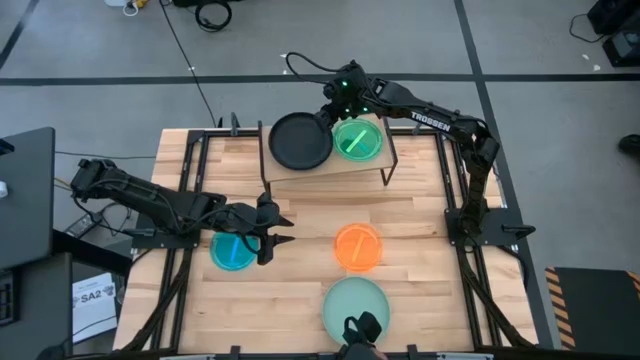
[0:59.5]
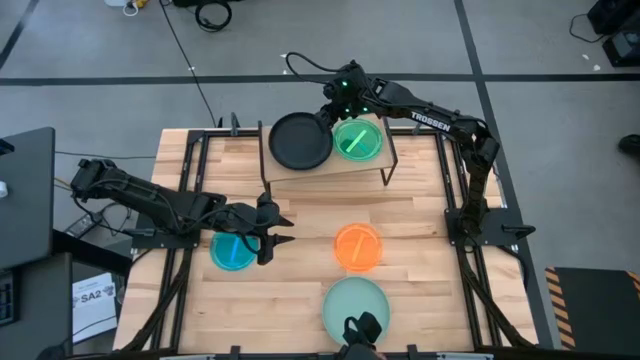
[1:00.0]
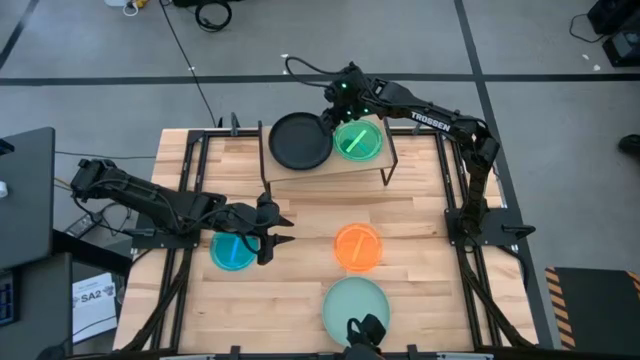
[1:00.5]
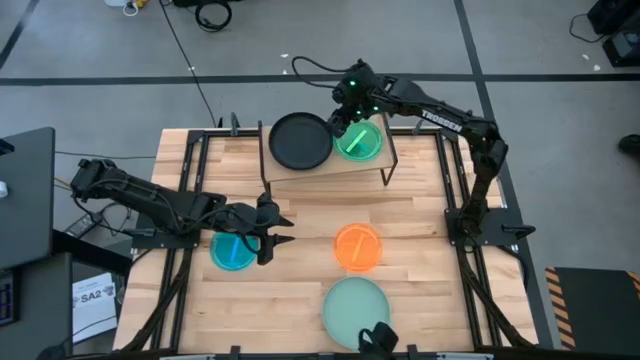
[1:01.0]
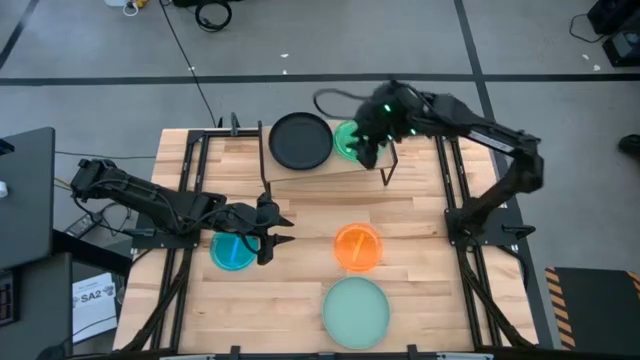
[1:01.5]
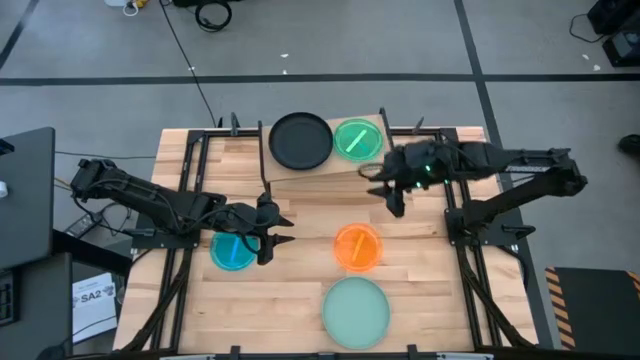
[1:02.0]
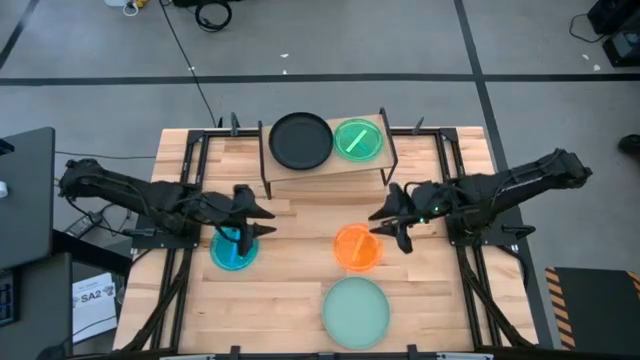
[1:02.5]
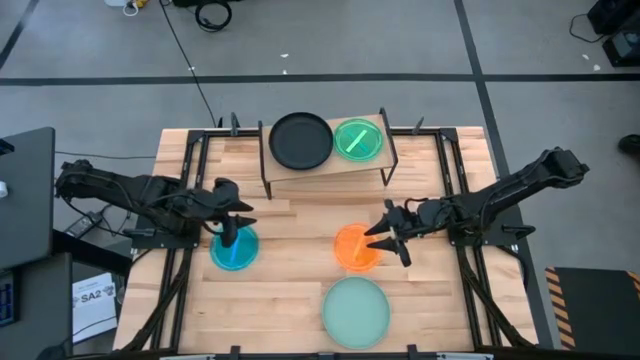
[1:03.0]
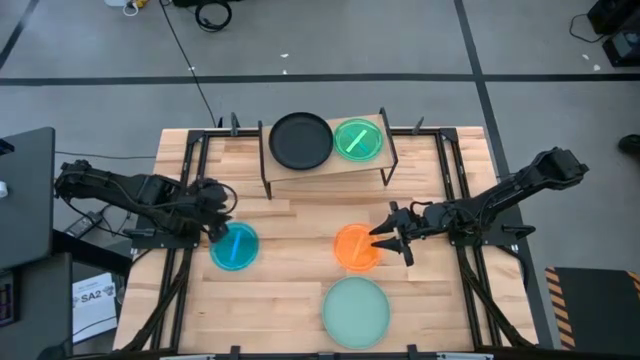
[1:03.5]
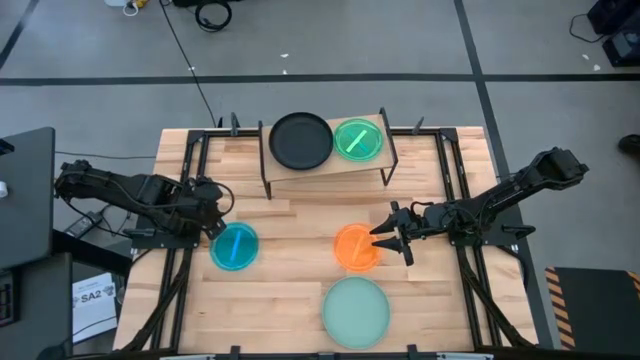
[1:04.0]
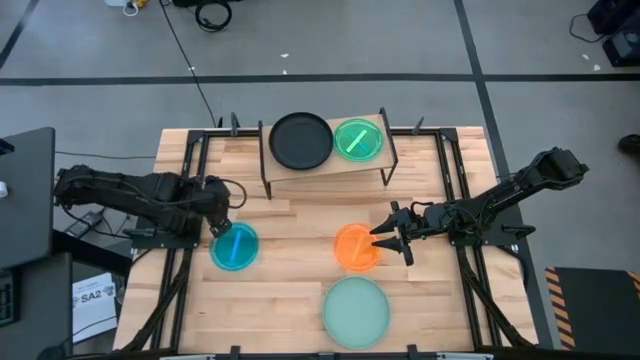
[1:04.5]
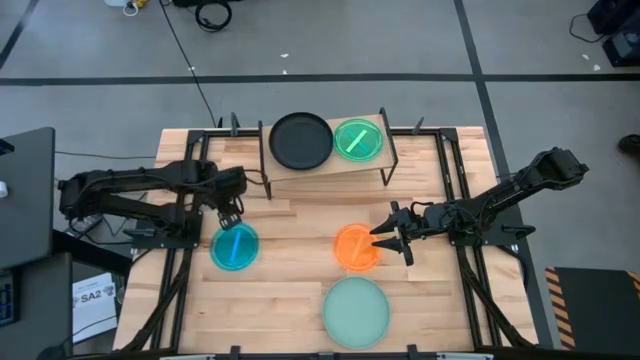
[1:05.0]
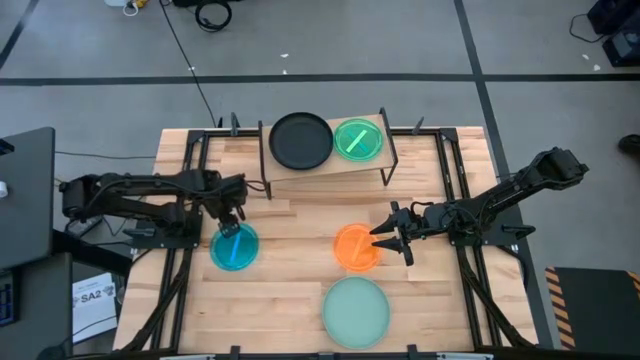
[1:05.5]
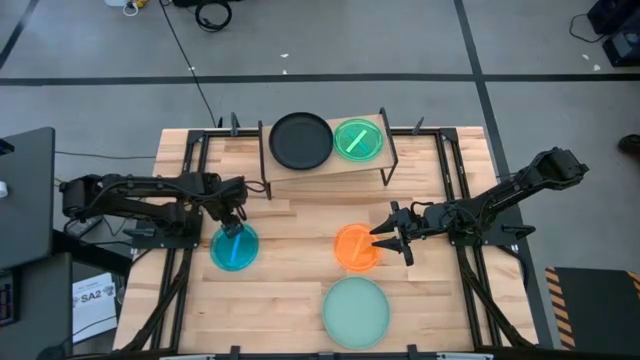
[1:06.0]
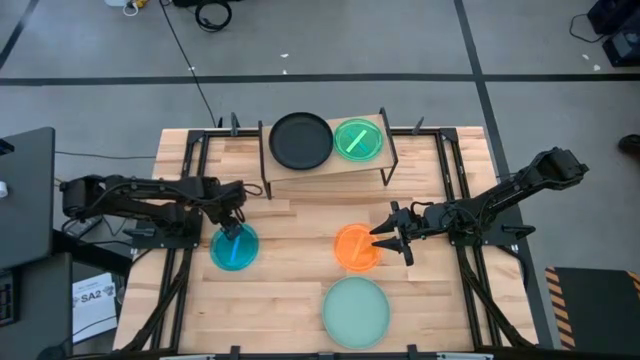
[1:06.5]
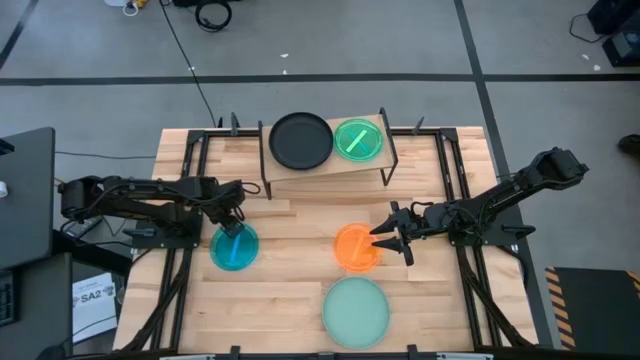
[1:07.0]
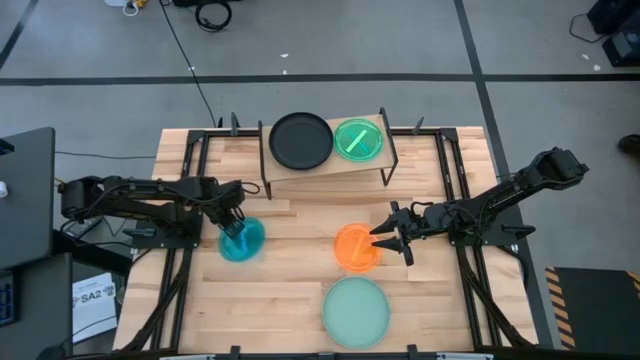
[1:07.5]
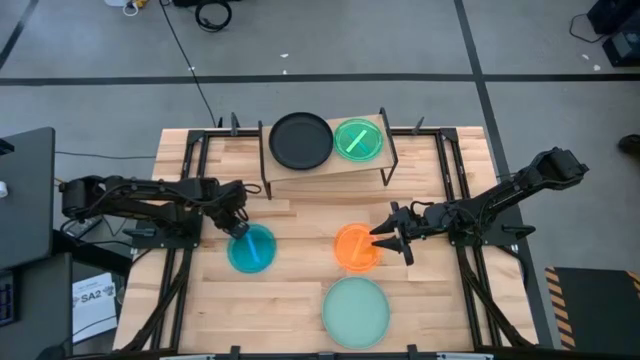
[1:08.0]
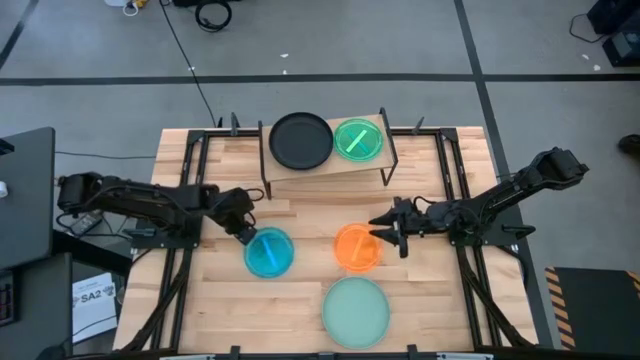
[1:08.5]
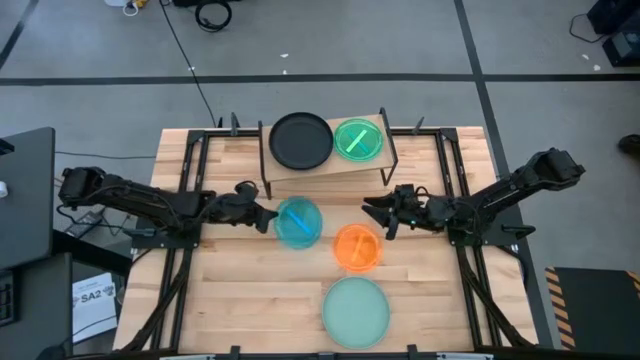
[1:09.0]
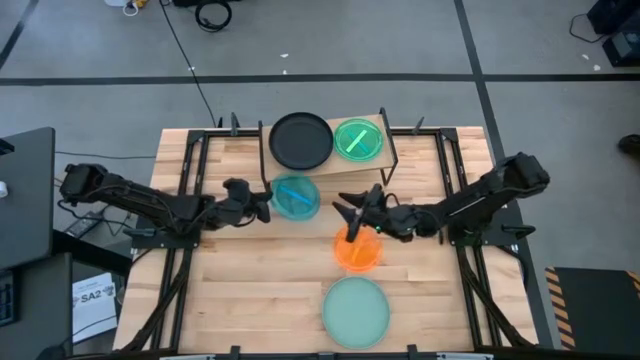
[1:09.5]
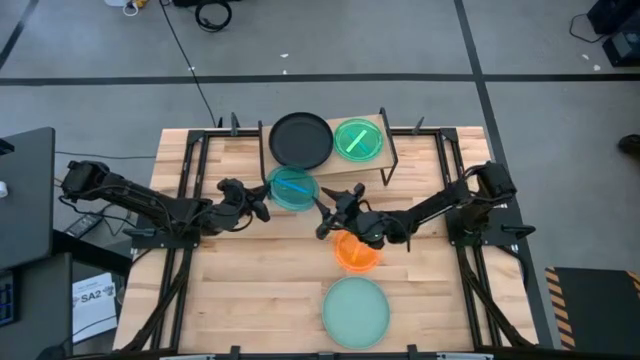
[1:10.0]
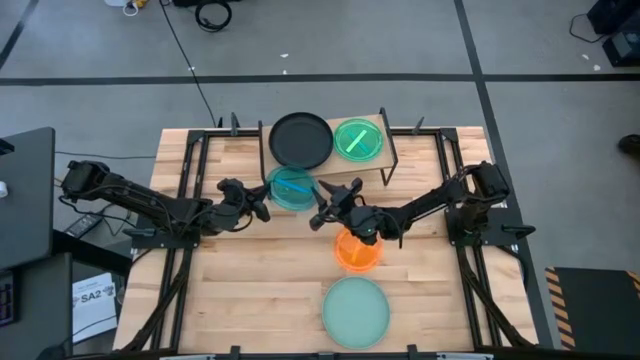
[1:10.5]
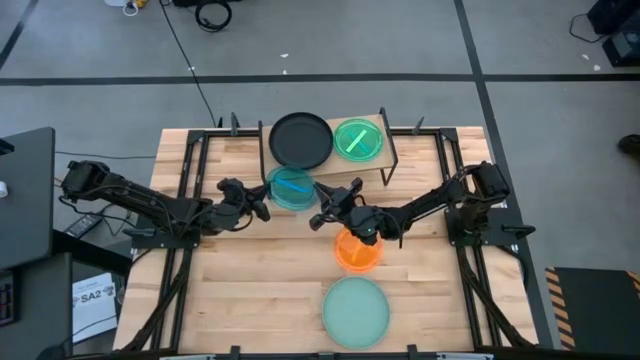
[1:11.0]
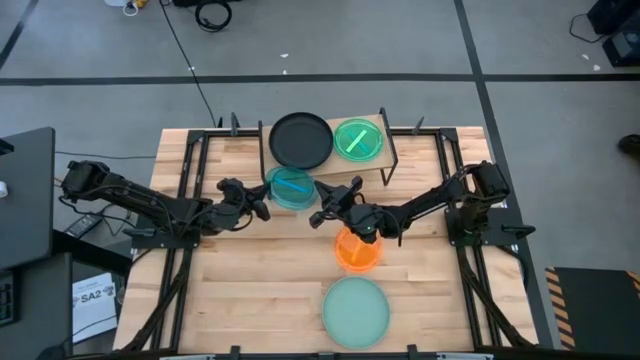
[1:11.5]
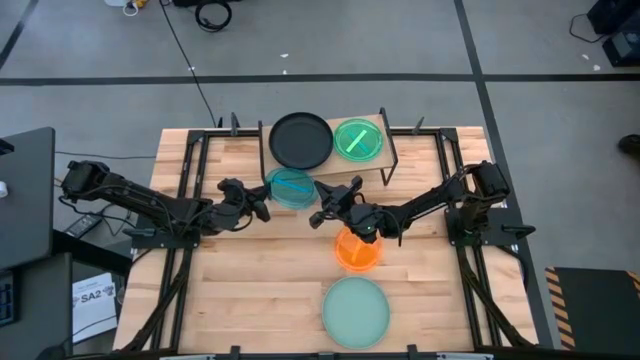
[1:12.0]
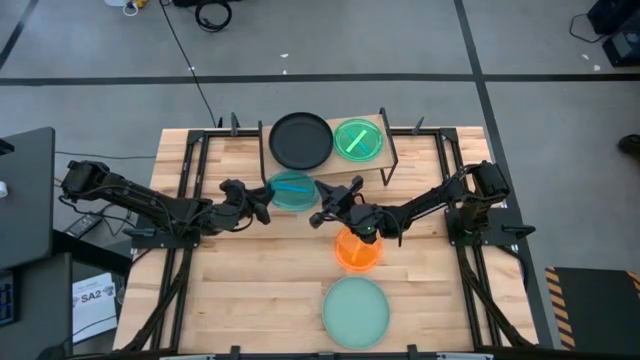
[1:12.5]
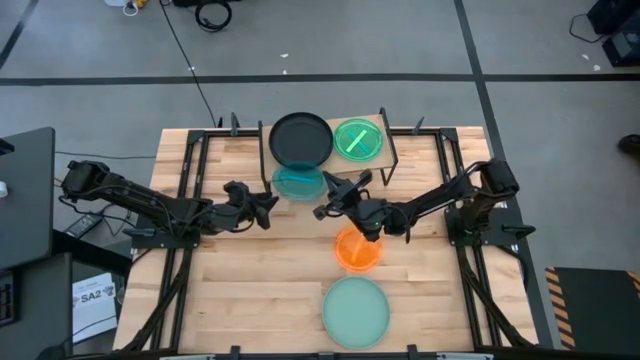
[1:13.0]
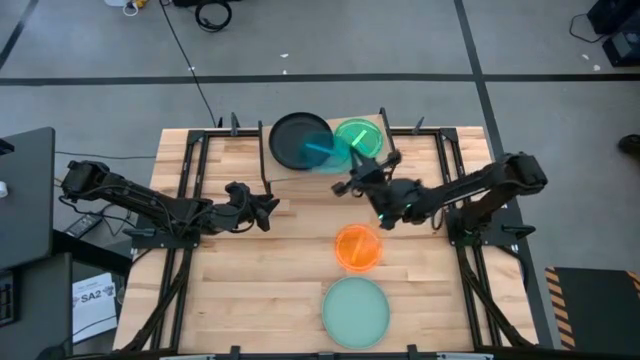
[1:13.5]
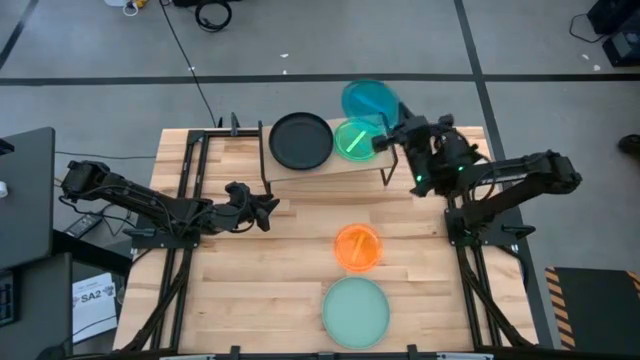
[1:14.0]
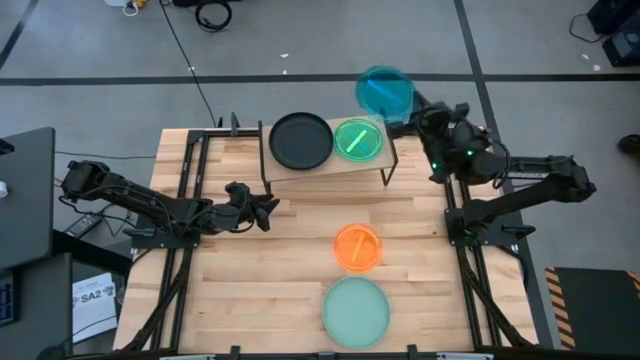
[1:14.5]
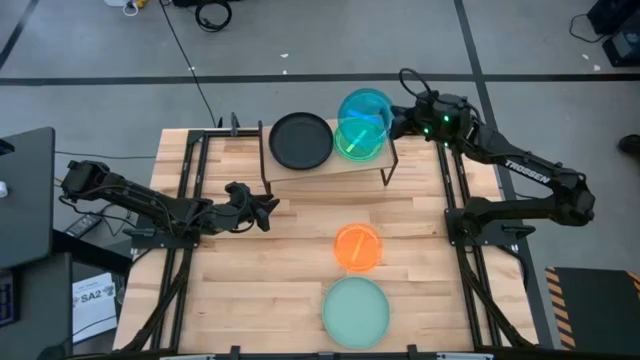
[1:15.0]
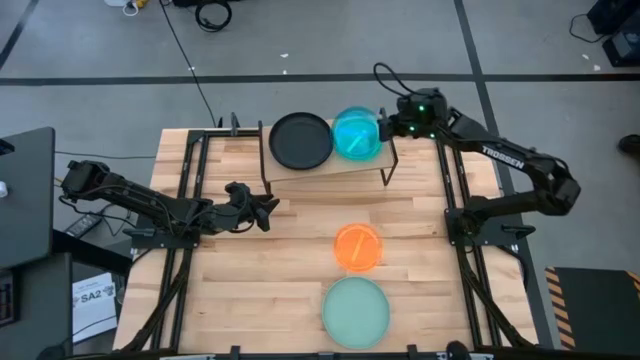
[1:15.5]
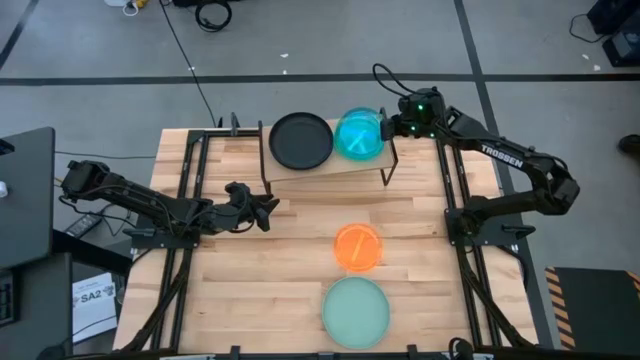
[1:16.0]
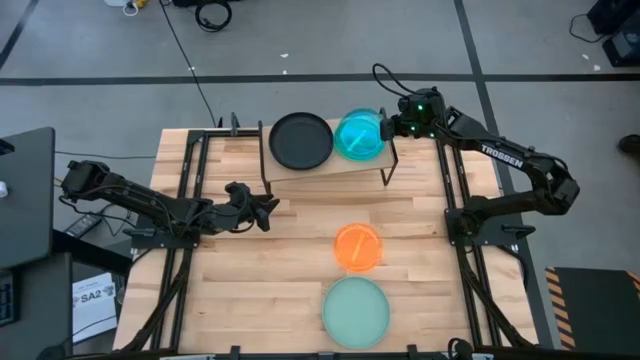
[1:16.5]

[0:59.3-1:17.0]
Task: Place and stack plates onto a shelf
Stack the light blue plate on top of the green plate on the shelf

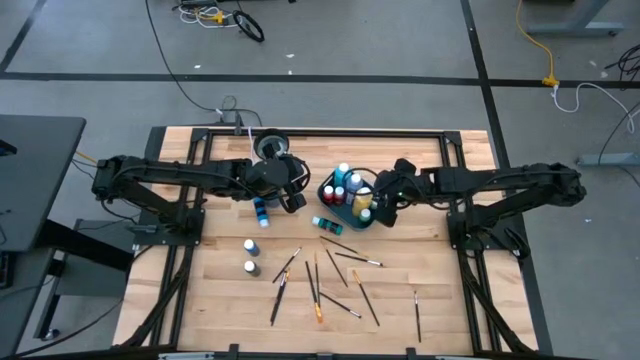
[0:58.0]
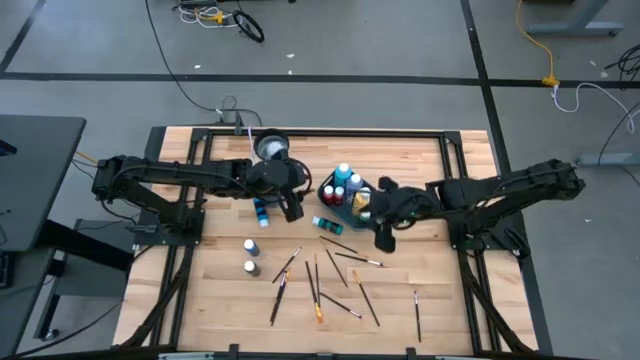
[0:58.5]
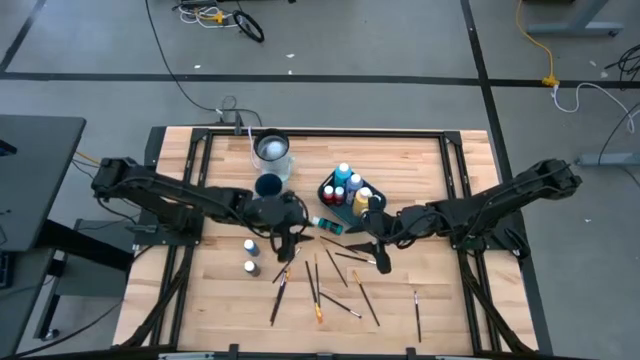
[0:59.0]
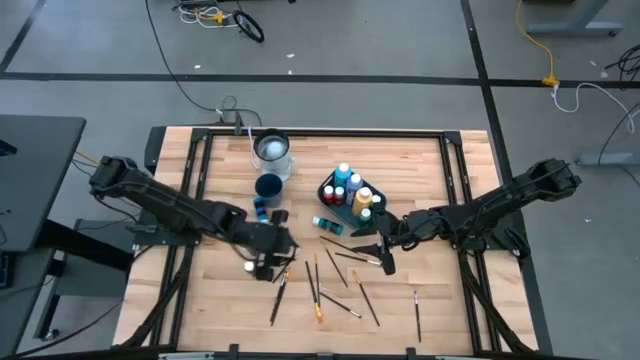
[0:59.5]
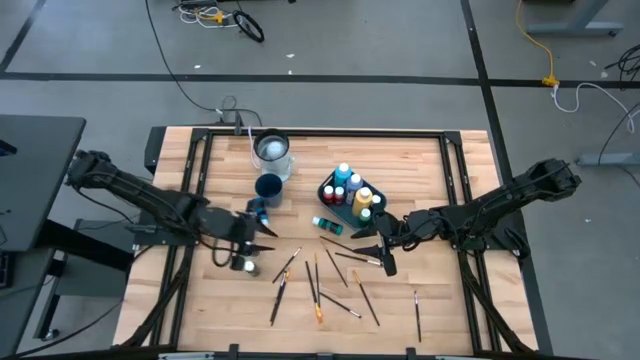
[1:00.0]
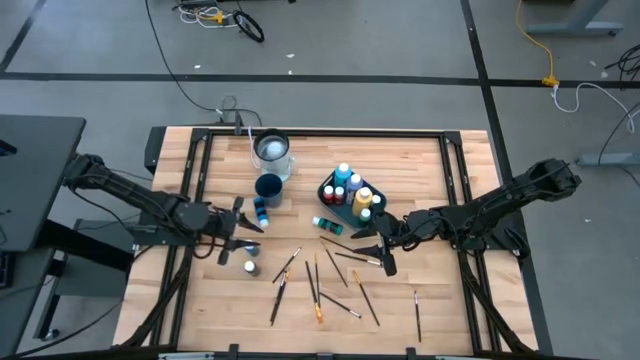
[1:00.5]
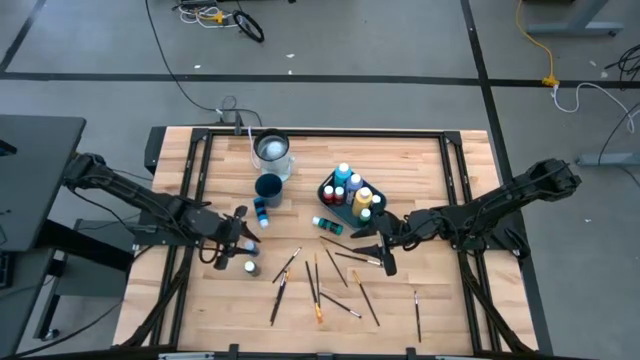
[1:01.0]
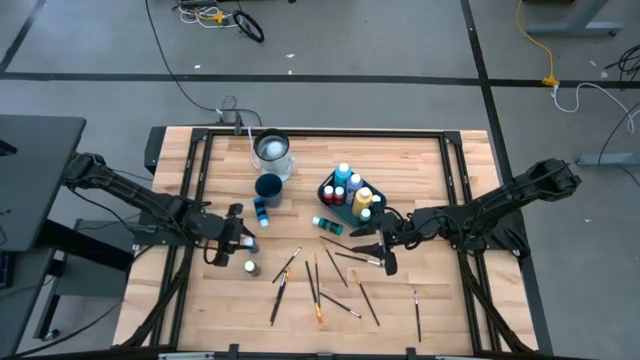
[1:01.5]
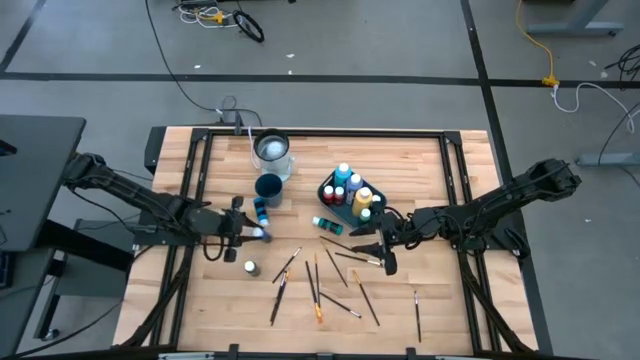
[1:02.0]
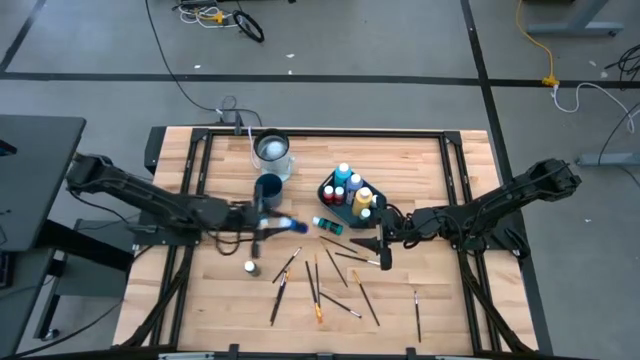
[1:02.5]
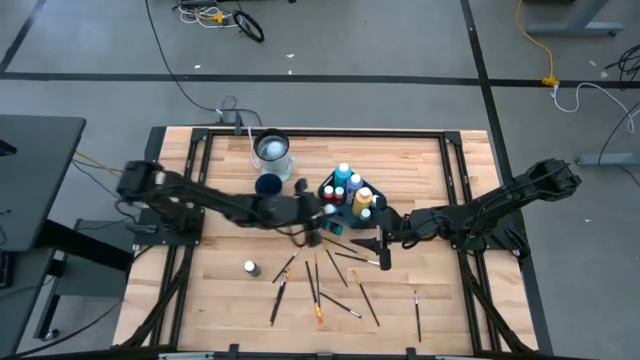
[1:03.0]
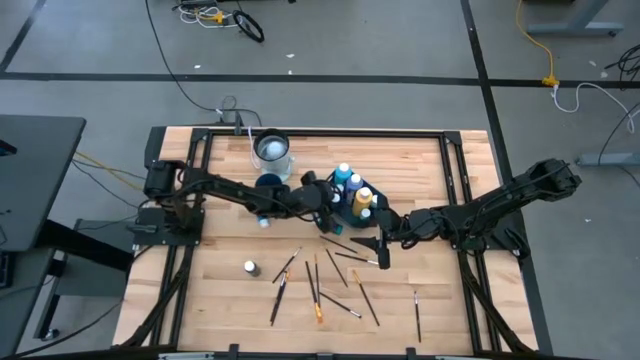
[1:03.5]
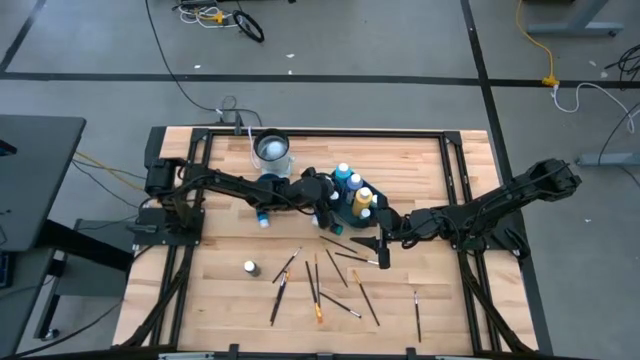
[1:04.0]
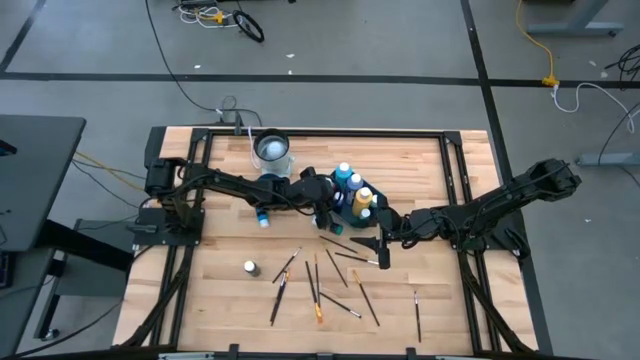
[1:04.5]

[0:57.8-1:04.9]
Task: Pick & Place Paint Supplies
Put the blue paint bottle into the blue bin
